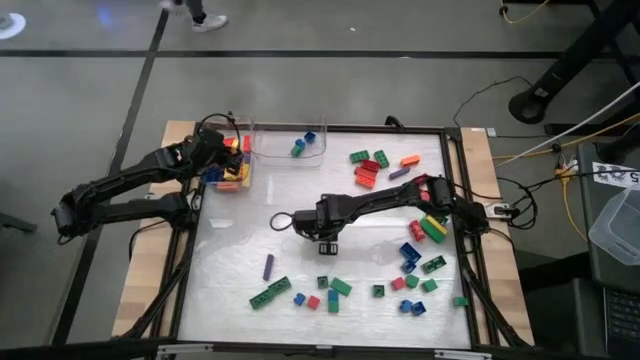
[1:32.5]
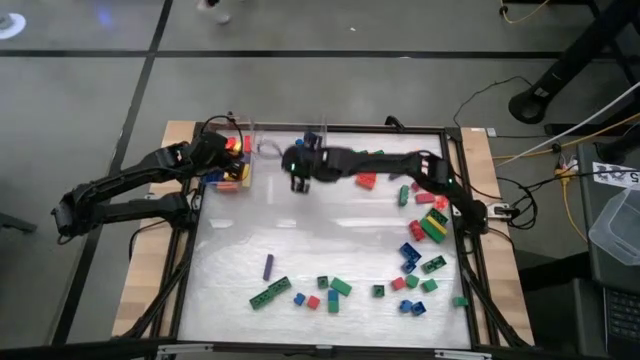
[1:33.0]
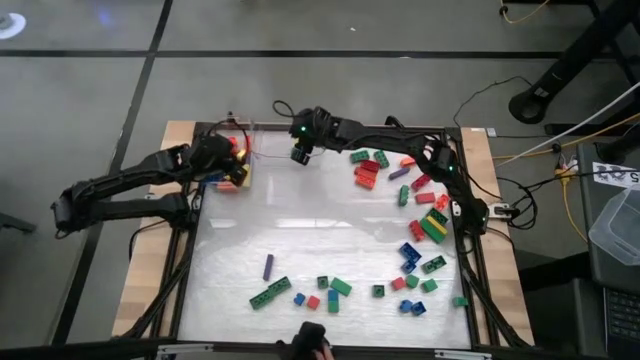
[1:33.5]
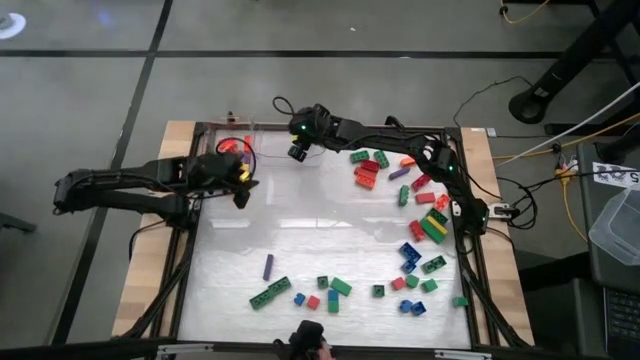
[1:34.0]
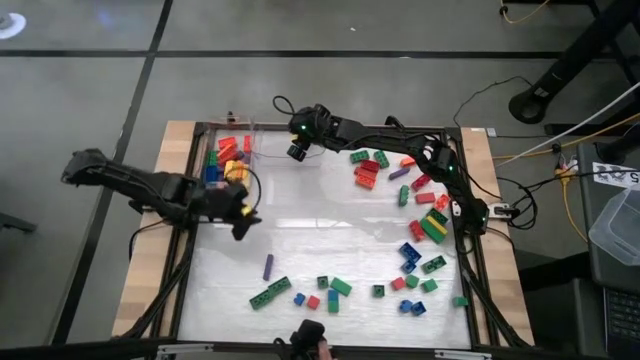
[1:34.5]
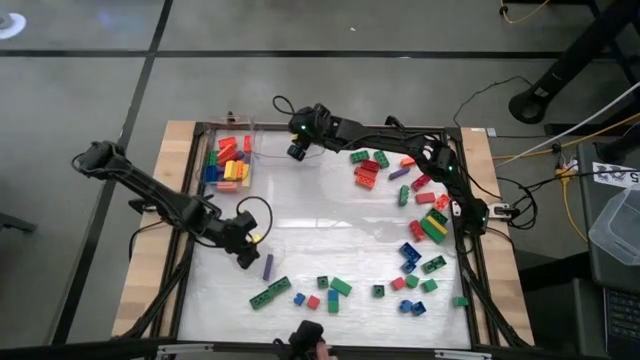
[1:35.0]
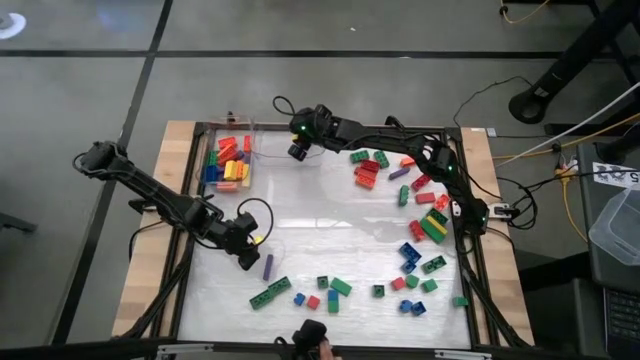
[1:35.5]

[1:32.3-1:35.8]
Task: Sort blocks by size
Put the small orange game piece into the right transparent bin

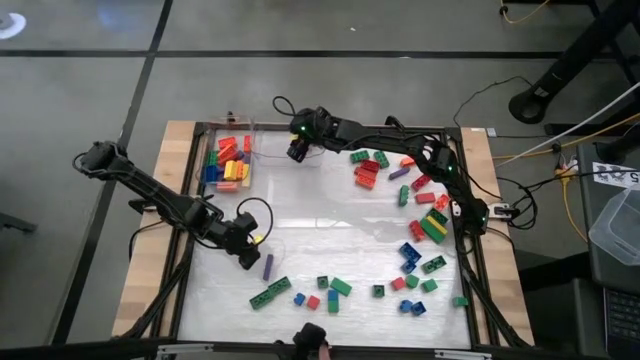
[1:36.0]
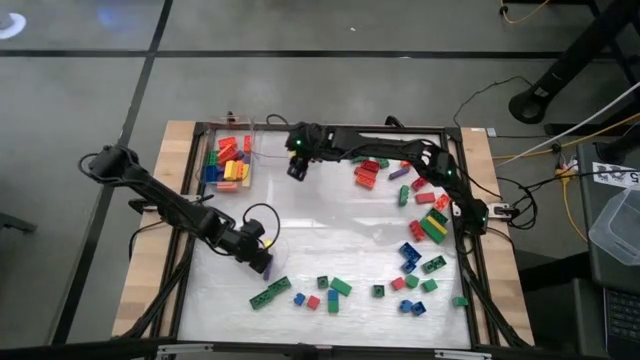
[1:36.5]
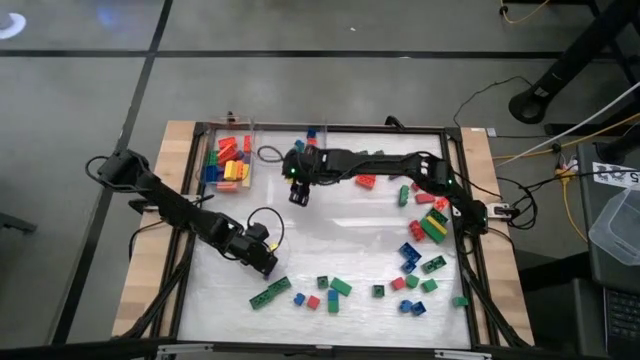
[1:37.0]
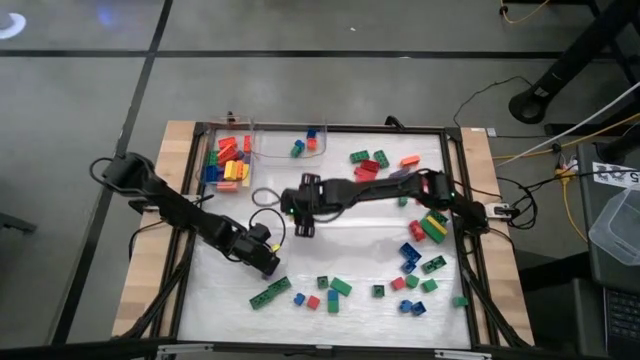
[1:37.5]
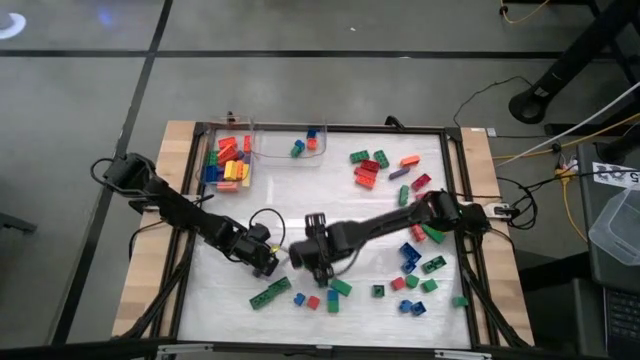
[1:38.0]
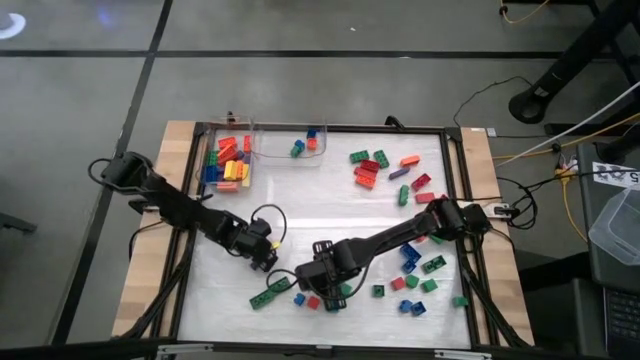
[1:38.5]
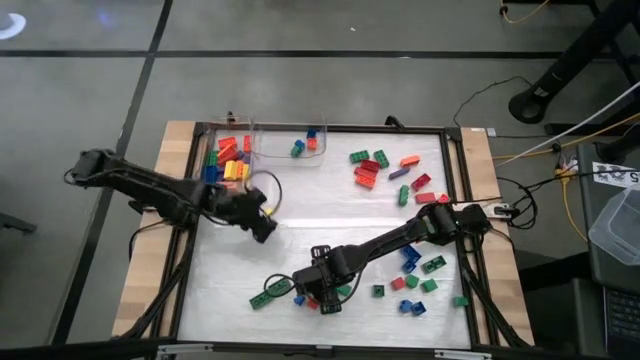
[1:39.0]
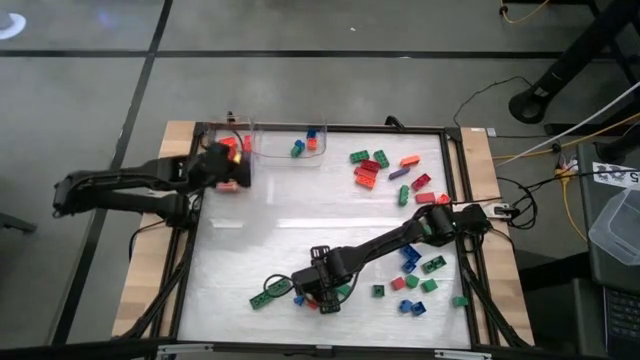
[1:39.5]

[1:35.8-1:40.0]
Put the large purple block into the left transparent bin

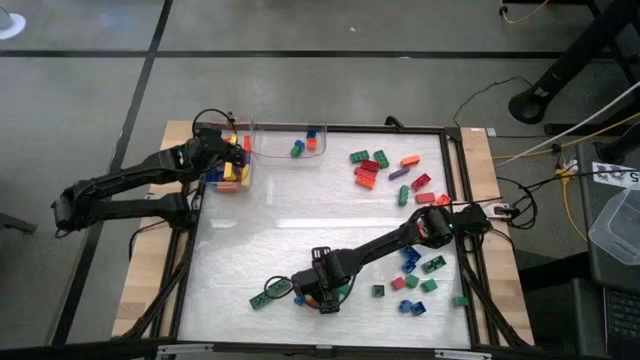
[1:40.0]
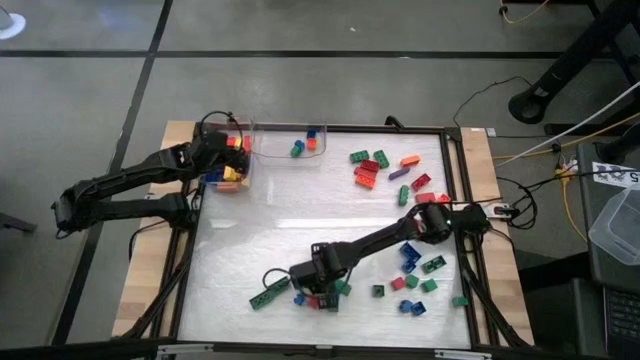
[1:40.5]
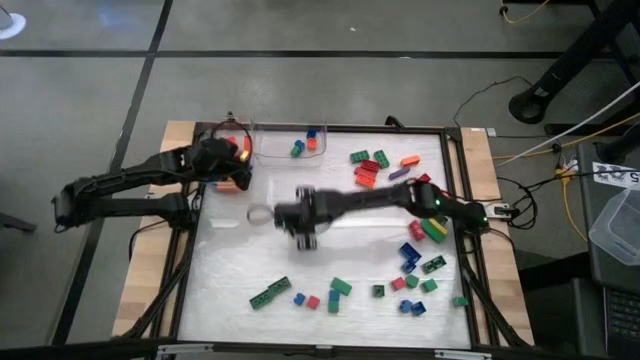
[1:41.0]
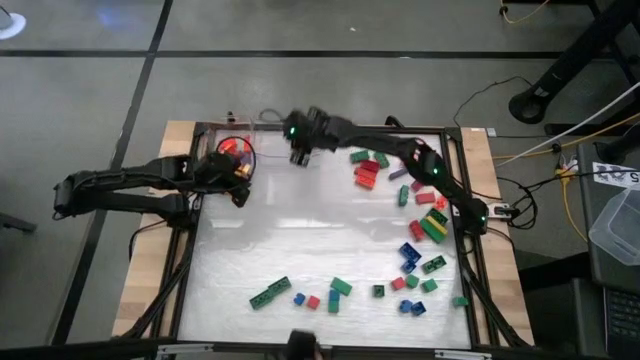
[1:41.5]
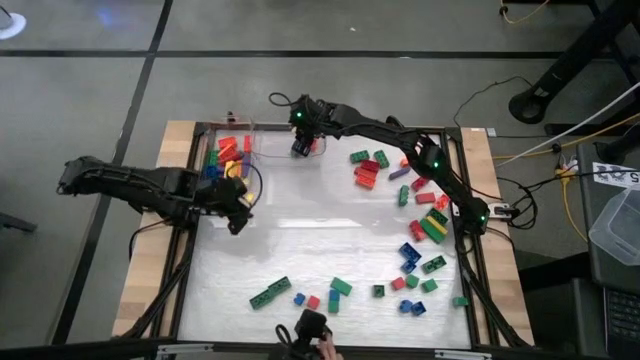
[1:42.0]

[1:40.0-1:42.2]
Put the small green game piece into the right transparent bin

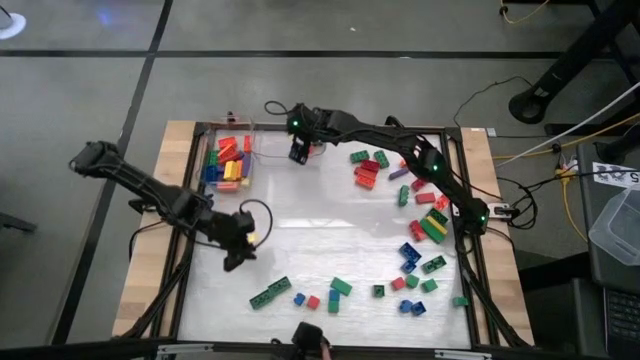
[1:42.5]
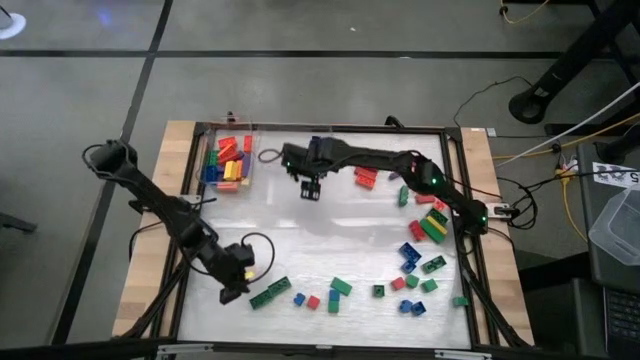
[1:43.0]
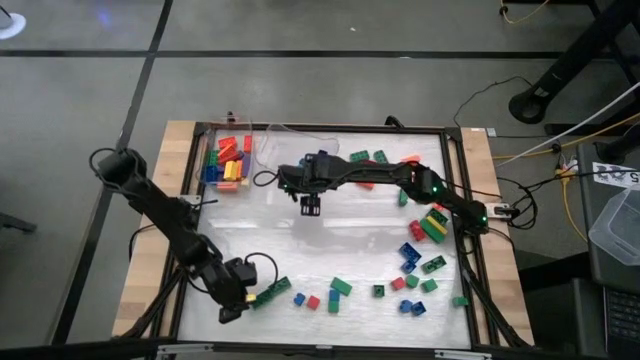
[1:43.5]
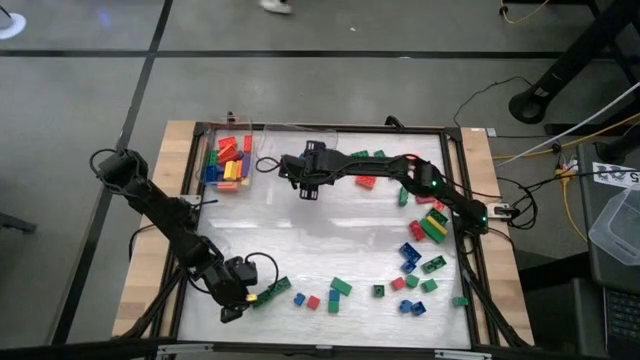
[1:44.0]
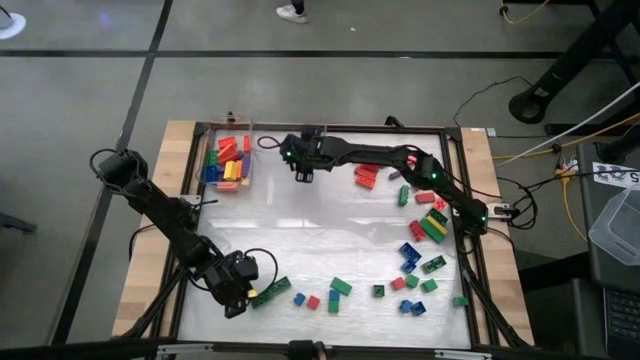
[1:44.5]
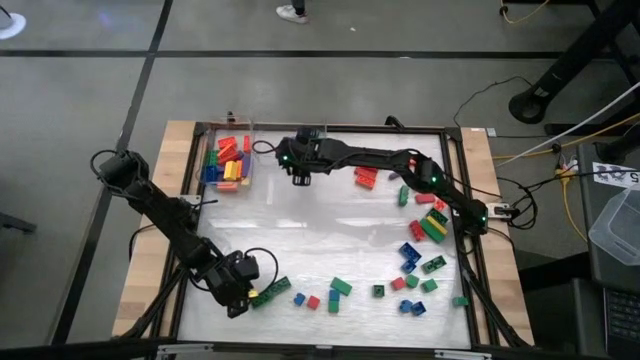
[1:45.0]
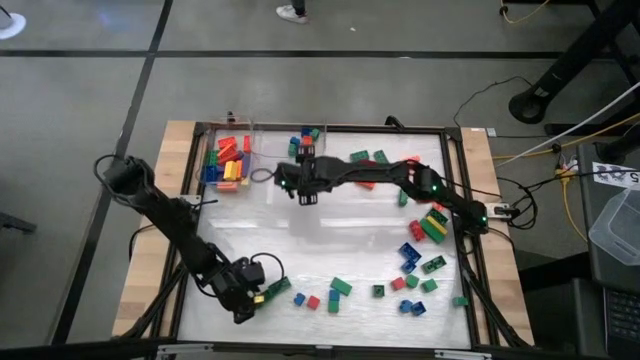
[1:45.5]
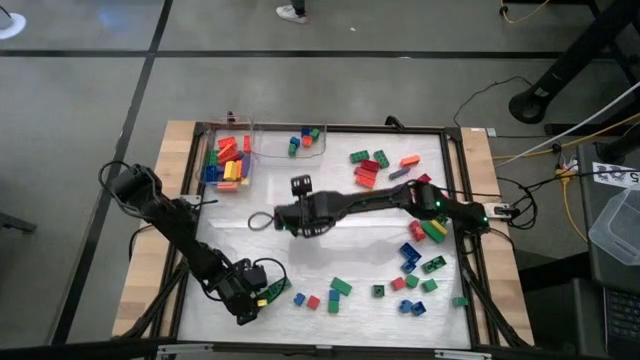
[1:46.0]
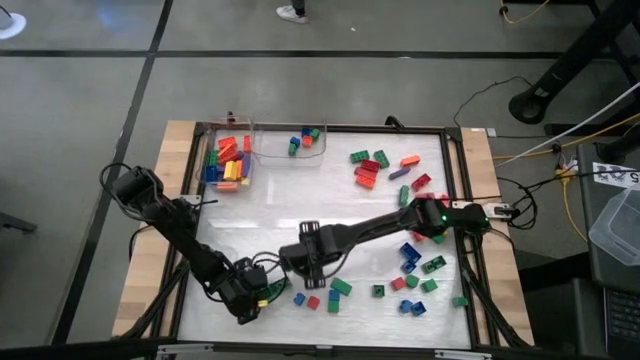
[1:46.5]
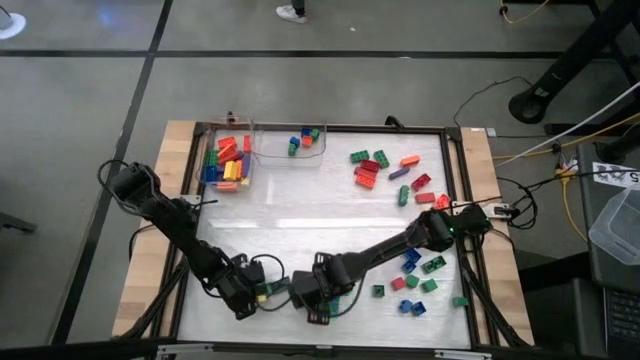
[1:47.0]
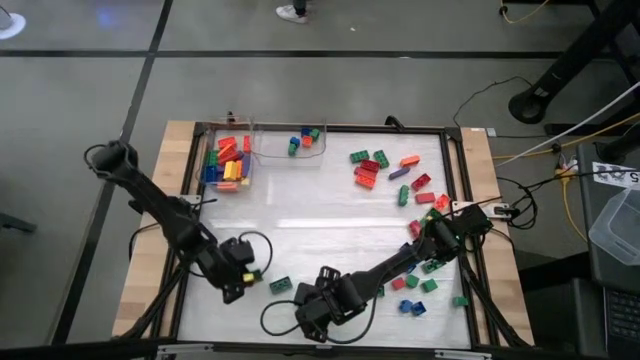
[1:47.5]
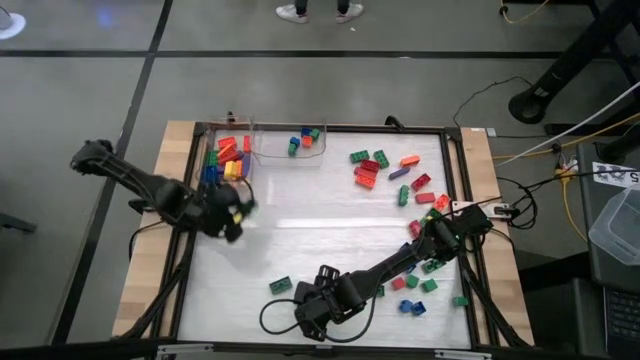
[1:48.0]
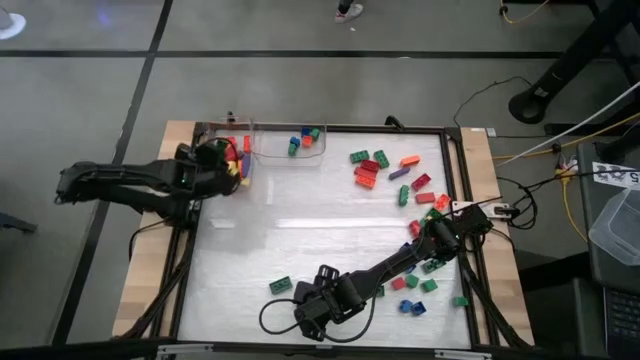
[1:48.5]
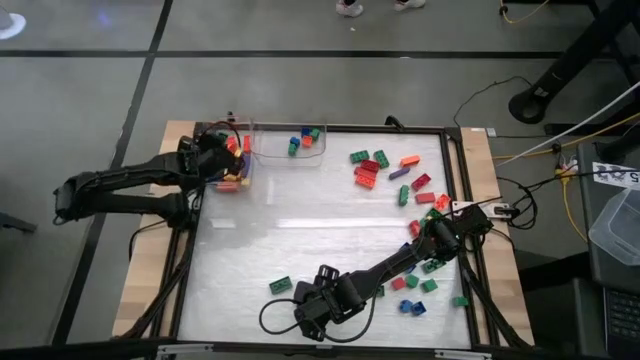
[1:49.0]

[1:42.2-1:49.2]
Put the large green game piece into the left transparent bin

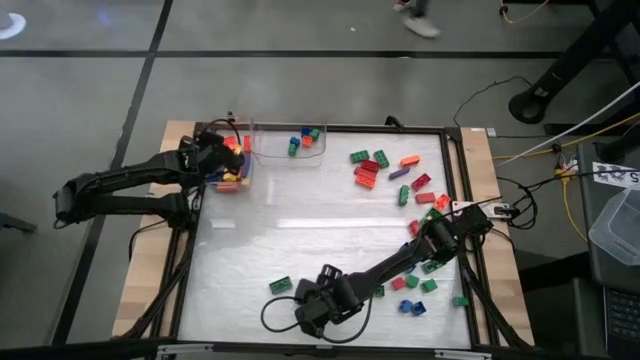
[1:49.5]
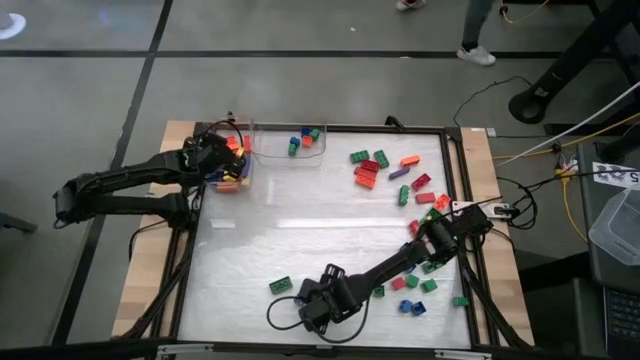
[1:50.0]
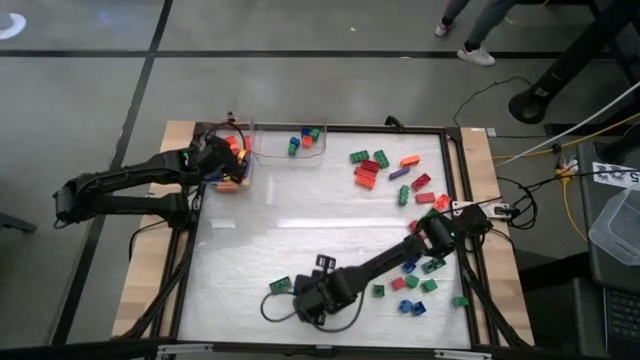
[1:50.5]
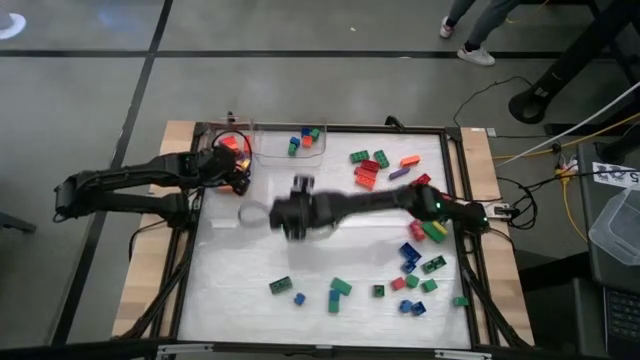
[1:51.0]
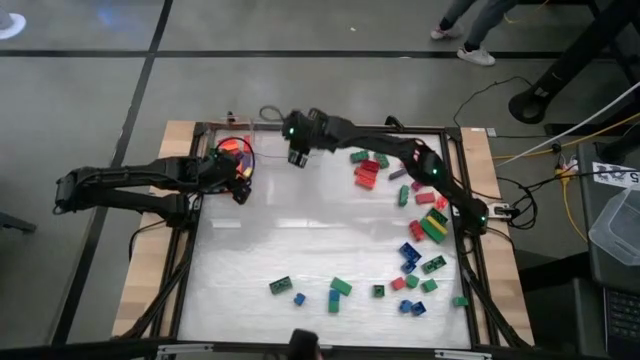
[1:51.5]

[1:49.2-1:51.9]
Put the small red block into the right transparent bin

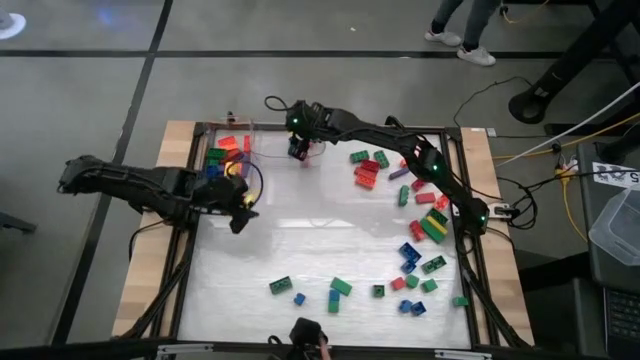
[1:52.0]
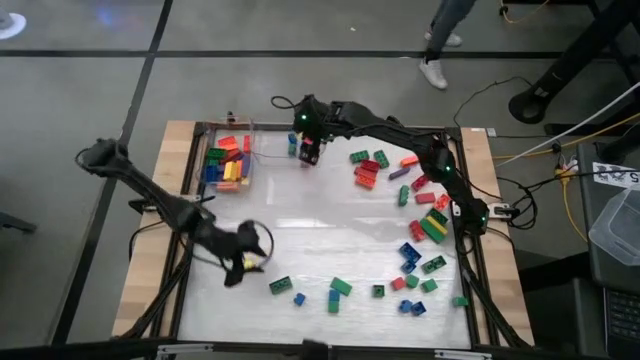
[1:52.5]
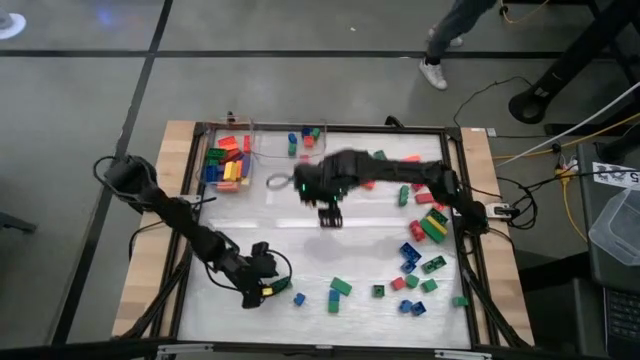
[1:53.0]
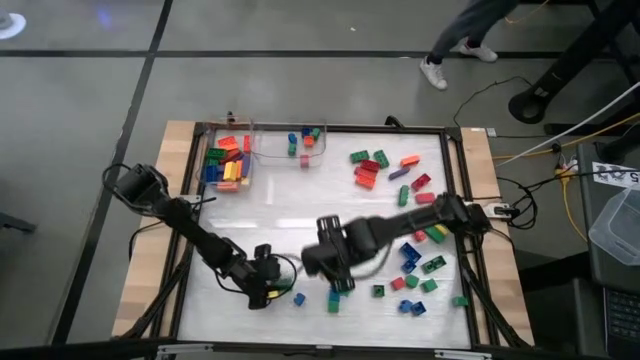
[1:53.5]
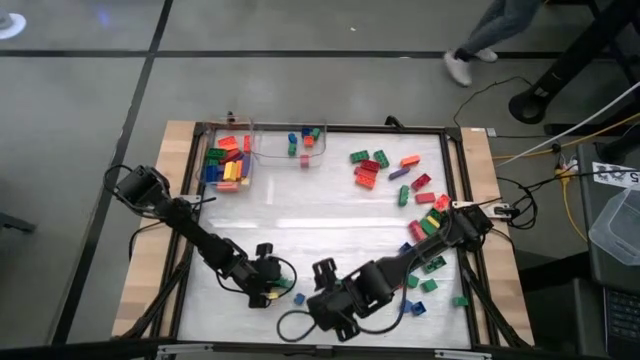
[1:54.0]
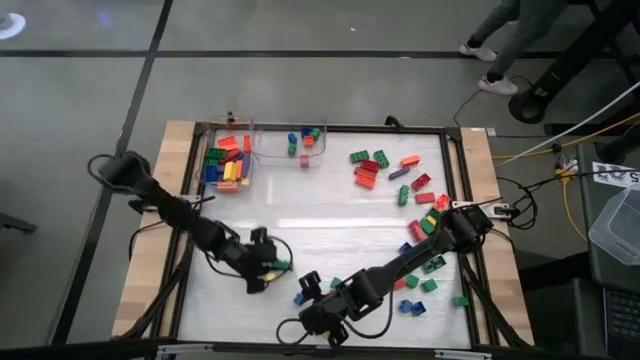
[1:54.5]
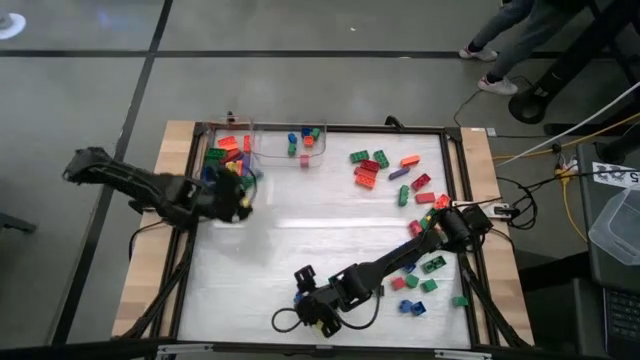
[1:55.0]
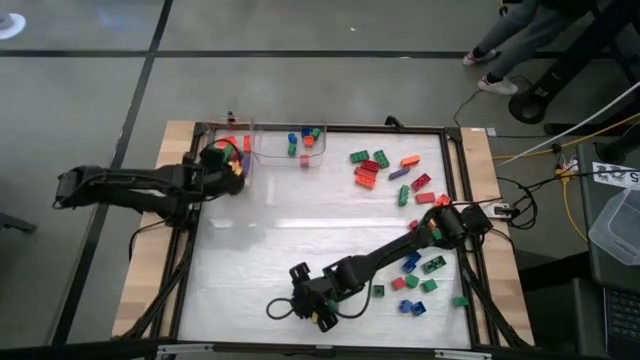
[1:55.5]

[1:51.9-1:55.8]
Put the large green game piece into the left transparent bin
